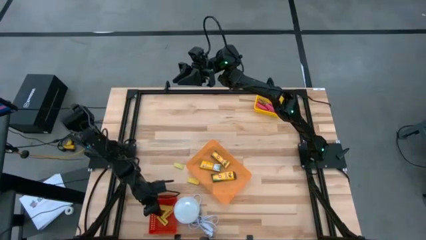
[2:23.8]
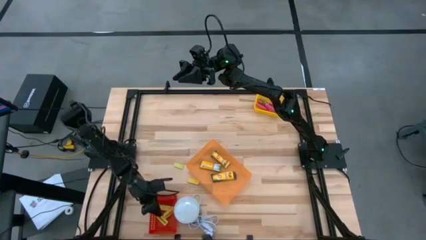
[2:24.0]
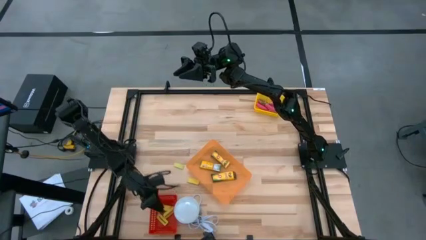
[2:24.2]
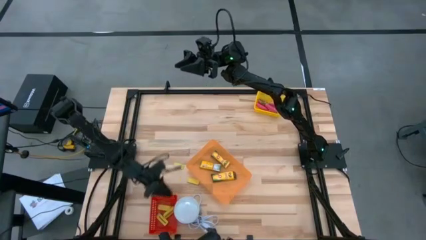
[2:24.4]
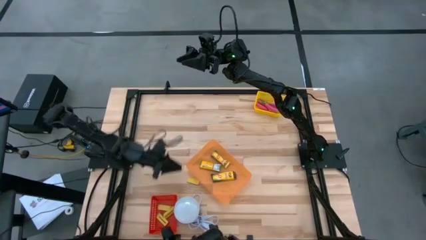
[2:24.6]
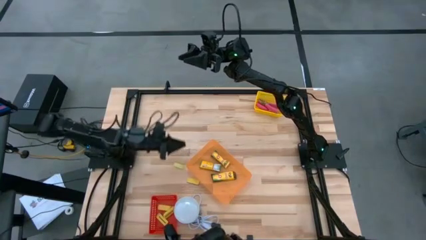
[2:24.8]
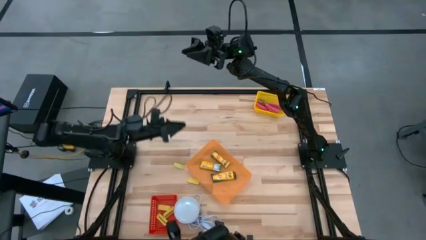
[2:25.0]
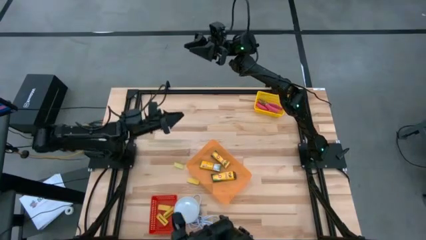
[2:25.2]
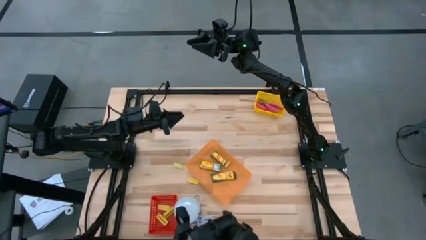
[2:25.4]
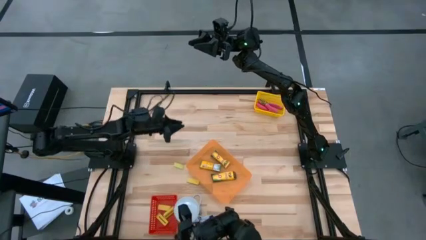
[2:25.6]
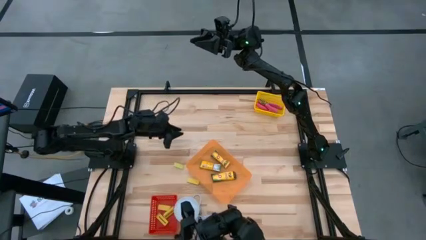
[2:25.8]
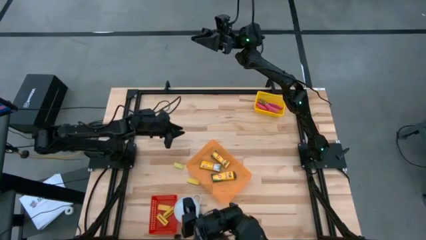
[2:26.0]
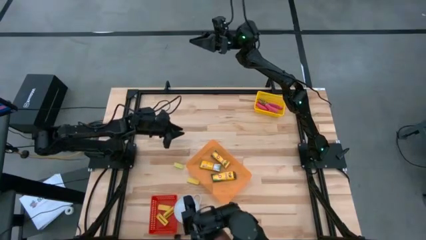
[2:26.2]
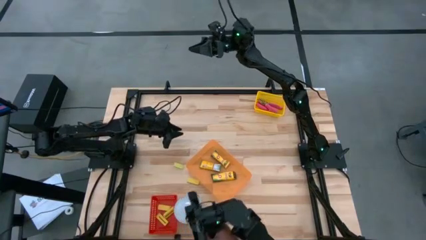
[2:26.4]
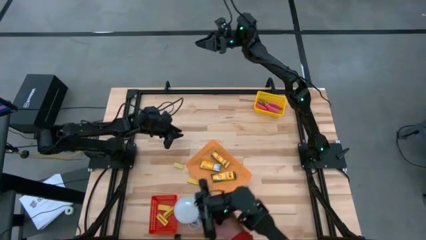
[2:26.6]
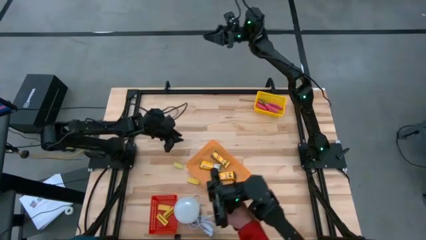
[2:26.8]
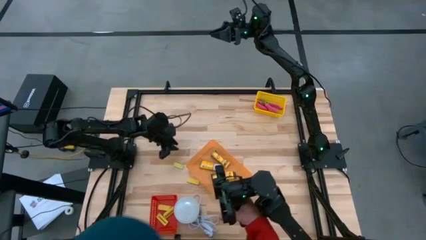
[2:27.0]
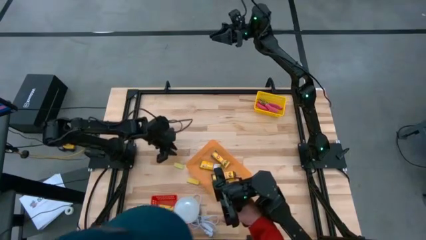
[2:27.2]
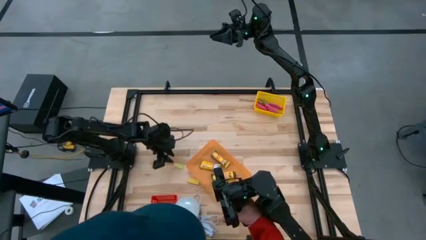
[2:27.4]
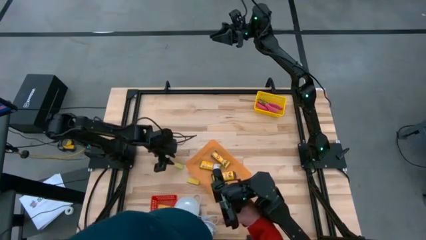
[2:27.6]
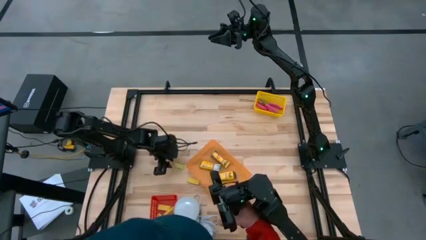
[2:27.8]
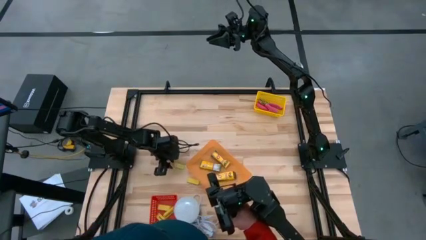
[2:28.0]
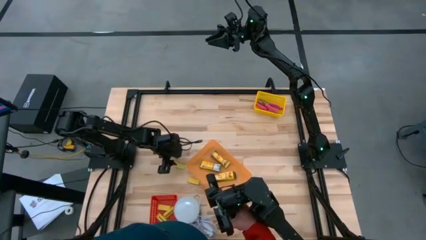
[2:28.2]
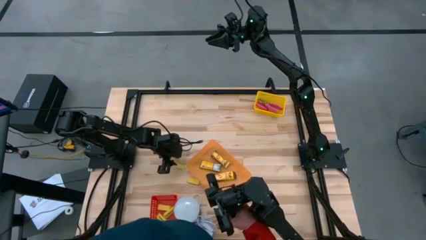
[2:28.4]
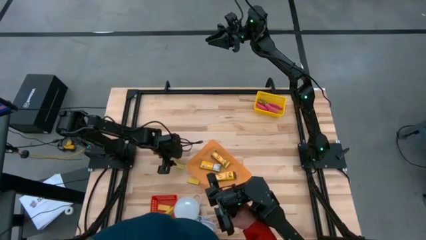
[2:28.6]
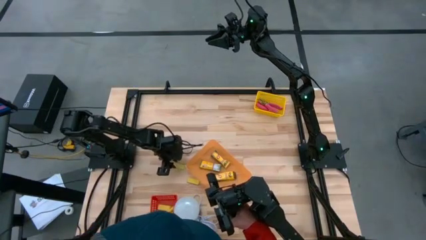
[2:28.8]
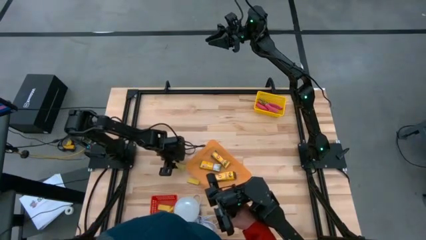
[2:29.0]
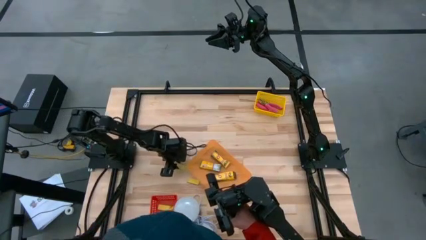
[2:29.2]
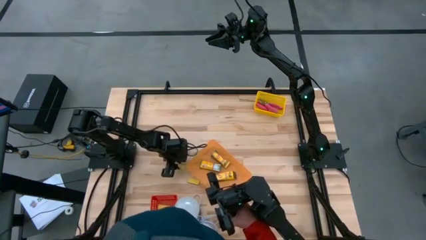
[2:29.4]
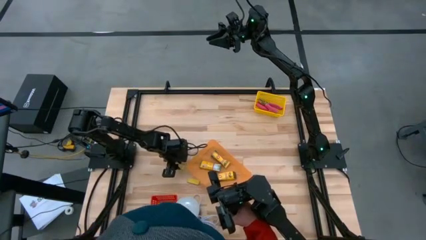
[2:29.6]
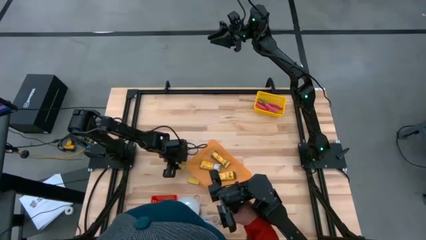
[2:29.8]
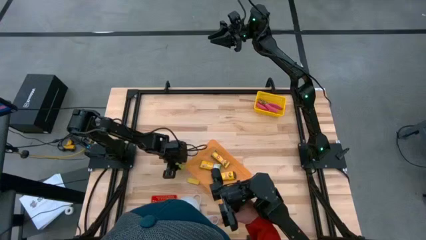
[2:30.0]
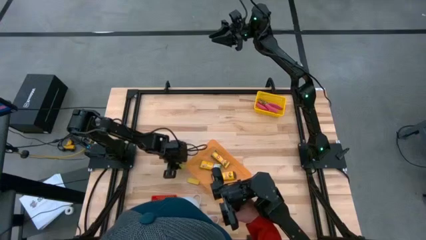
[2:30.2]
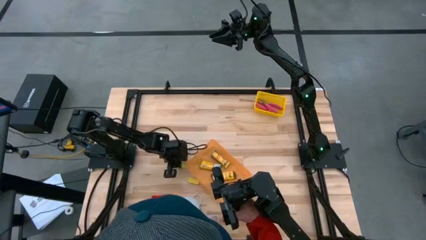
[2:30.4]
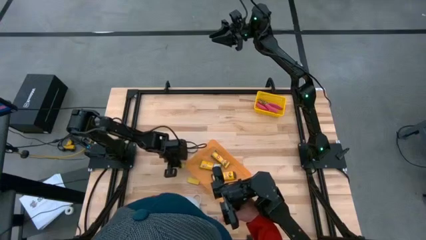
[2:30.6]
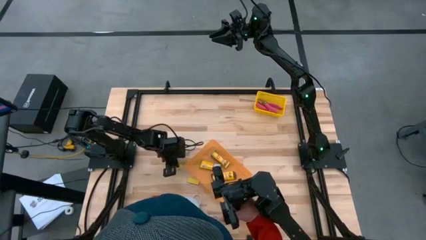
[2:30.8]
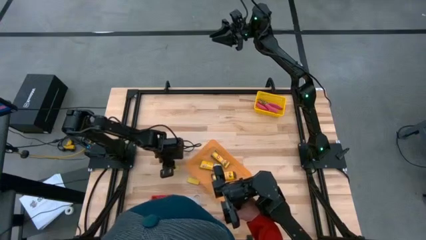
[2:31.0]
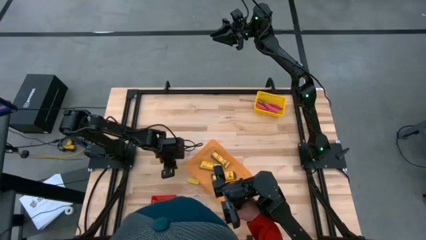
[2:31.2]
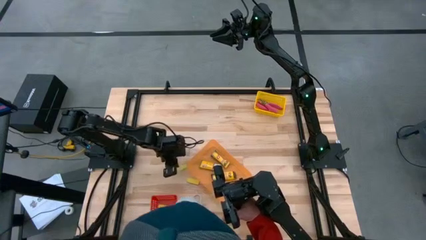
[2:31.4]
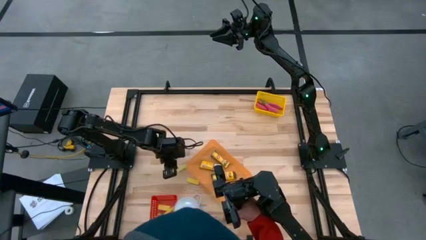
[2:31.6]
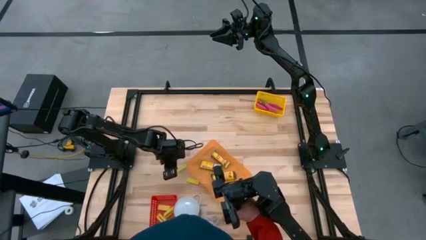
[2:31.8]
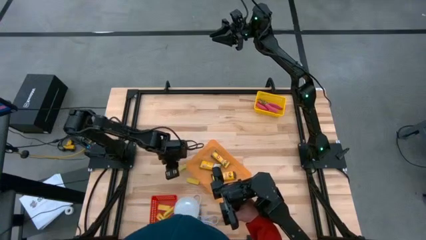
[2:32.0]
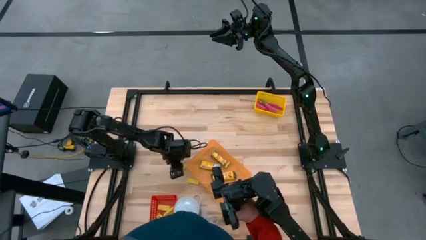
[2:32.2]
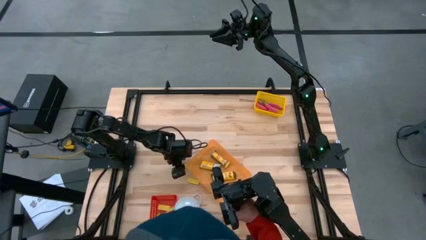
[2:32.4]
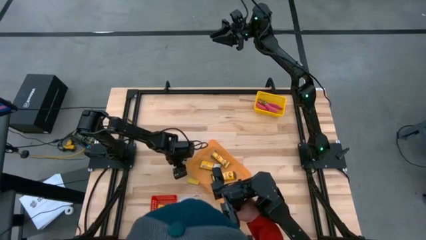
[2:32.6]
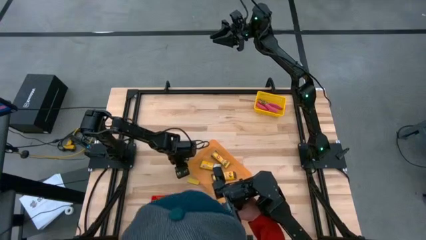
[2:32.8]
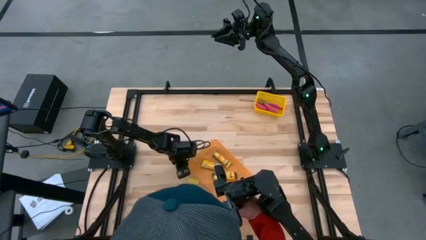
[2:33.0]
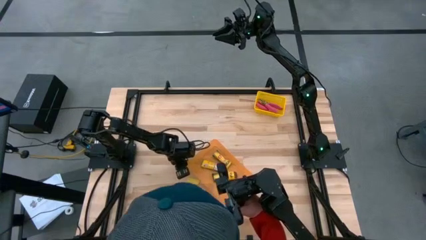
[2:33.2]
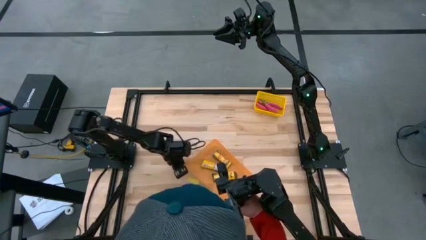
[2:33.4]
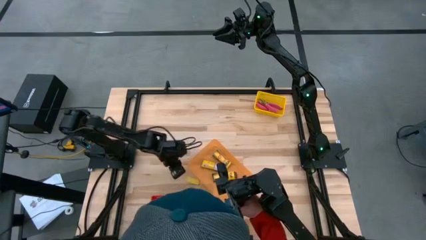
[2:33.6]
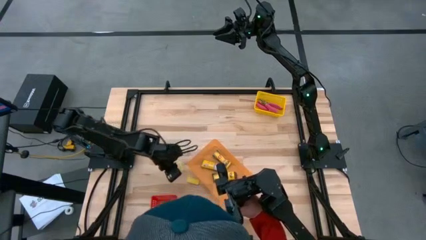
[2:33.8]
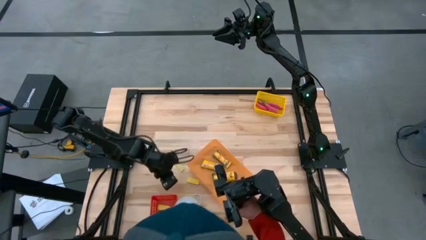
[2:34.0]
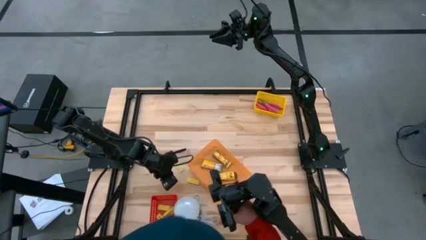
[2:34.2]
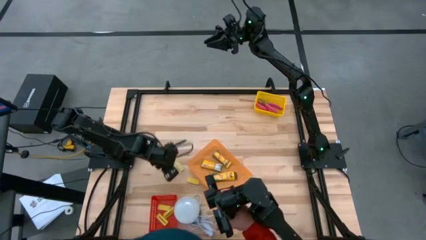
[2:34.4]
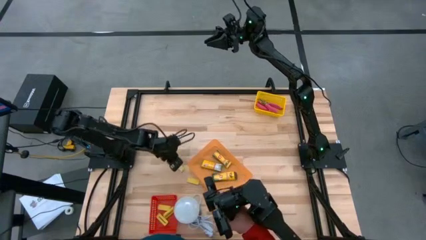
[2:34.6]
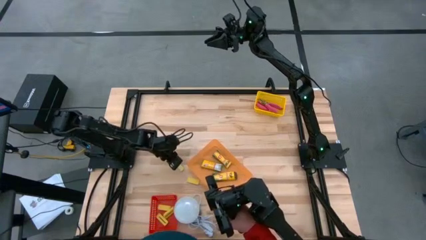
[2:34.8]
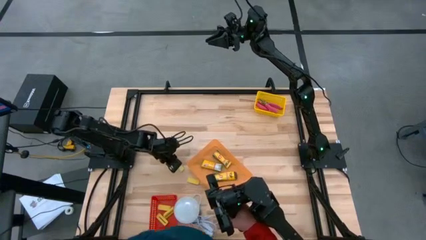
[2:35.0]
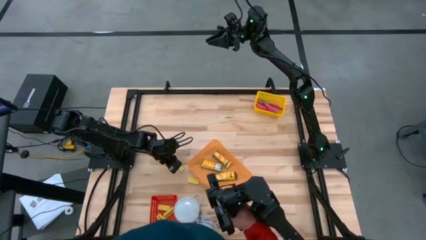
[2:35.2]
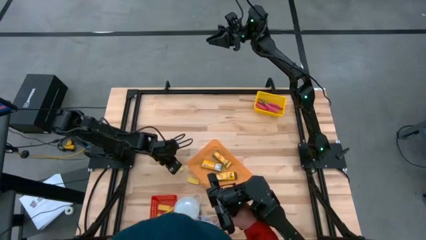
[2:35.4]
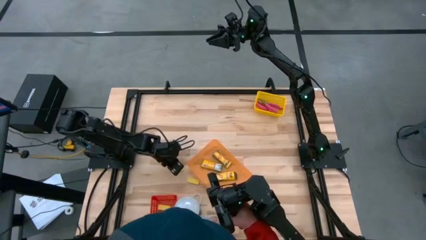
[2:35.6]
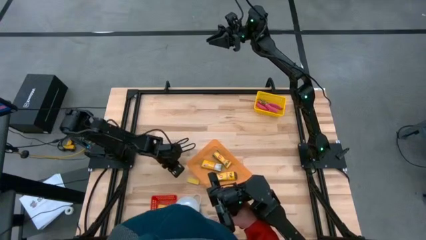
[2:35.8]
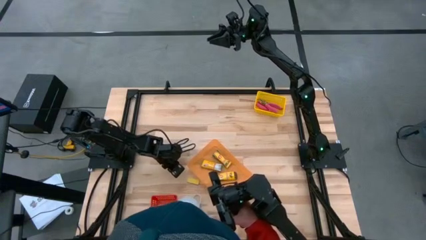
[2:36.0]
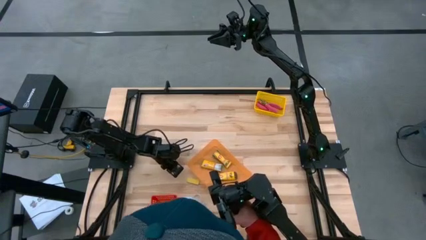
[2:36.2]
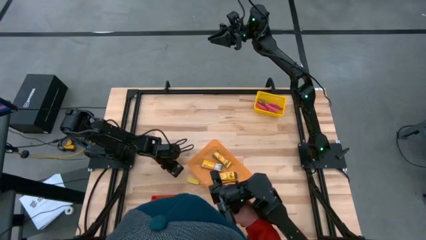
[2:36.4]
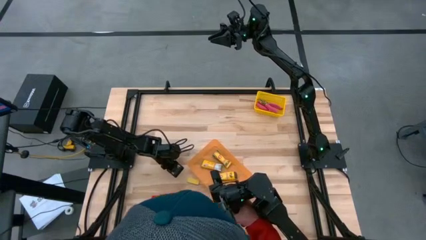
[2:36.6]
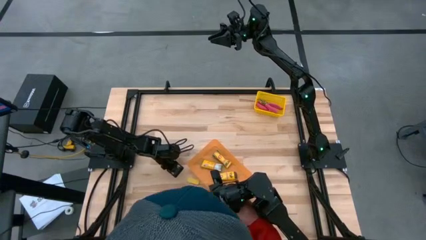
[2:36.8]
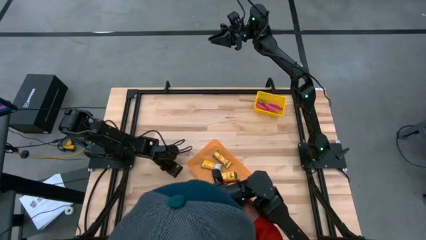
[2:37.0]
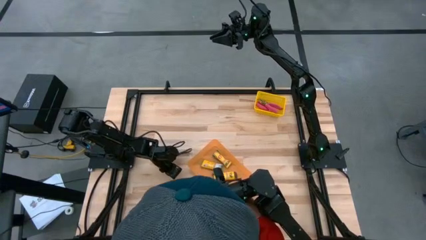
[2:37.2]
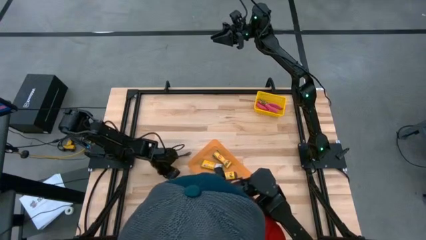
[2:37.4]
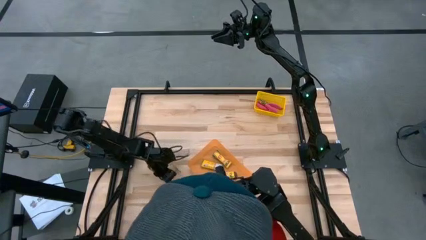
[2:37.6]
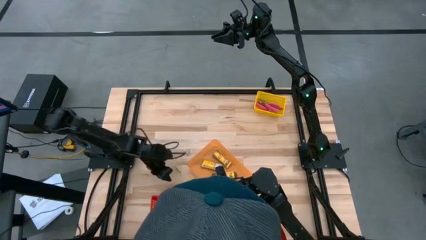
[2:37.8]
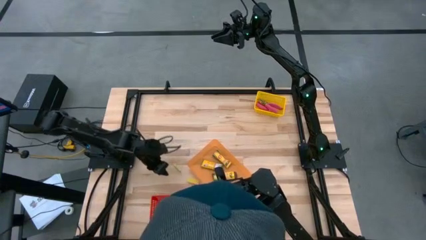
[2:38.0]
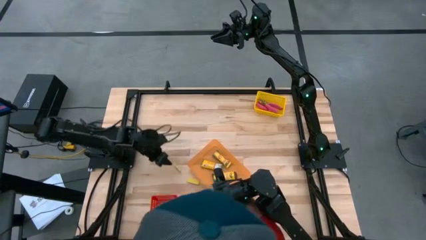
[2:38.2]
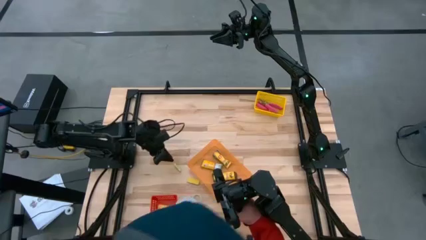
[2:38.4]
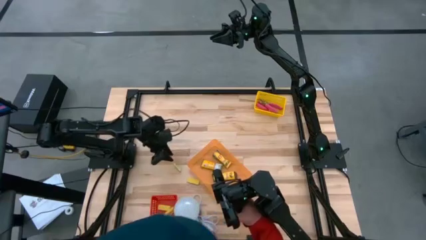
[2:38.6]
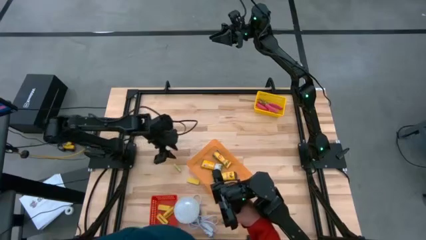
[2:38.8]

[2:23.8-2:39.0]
Task: Pick & Place School Supplies
Put the green eraser into the red bin
